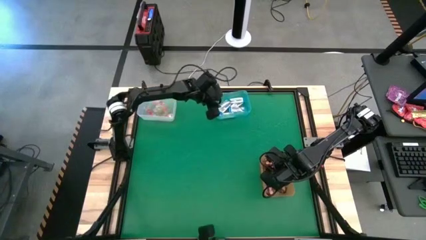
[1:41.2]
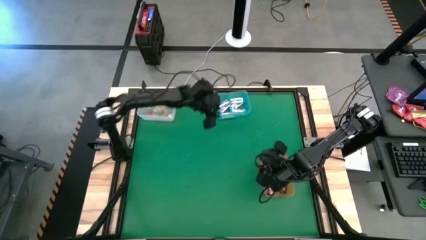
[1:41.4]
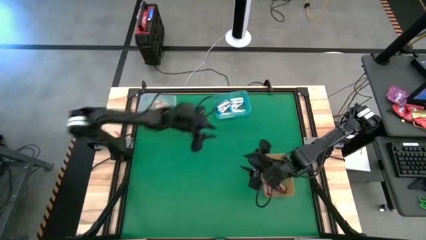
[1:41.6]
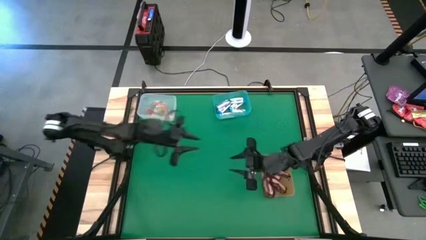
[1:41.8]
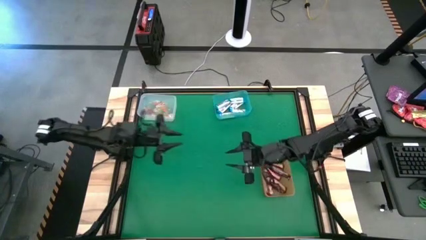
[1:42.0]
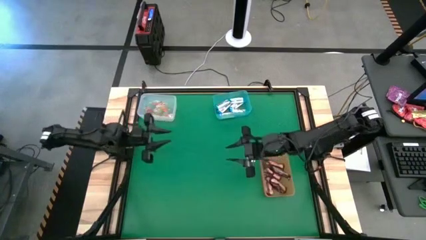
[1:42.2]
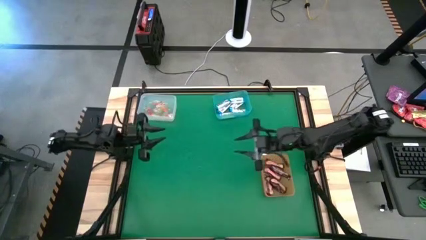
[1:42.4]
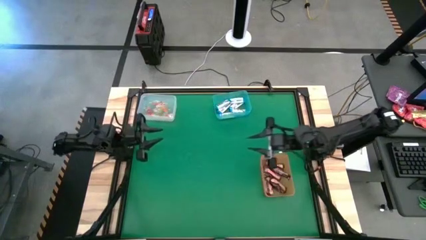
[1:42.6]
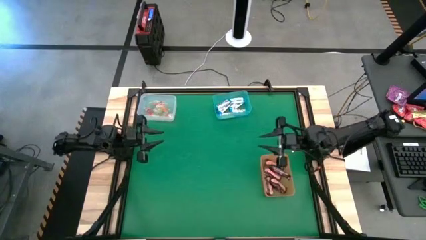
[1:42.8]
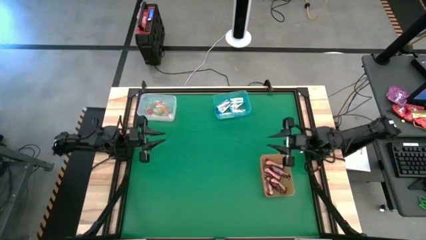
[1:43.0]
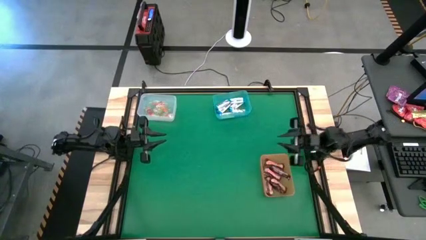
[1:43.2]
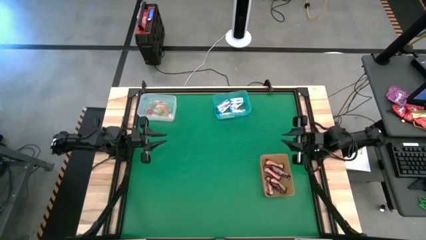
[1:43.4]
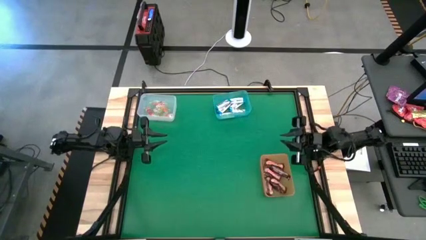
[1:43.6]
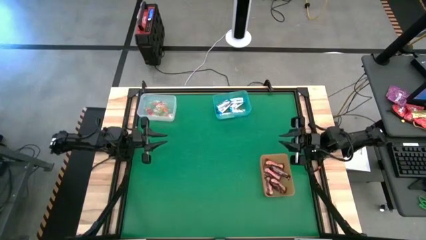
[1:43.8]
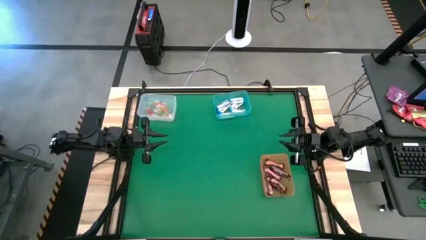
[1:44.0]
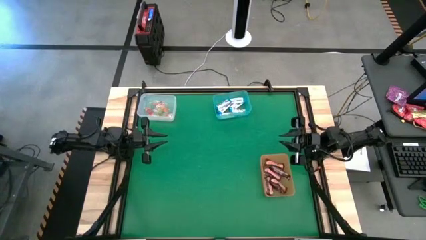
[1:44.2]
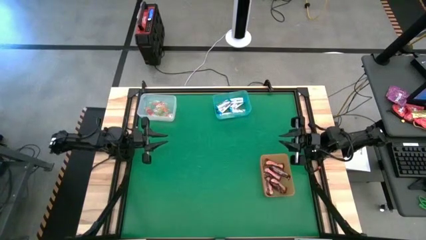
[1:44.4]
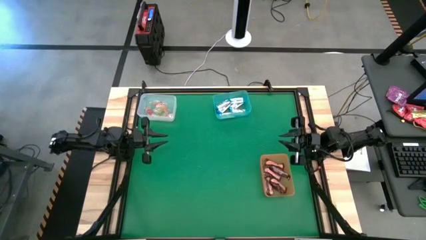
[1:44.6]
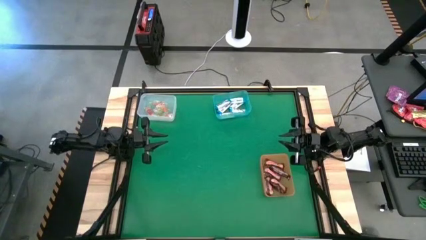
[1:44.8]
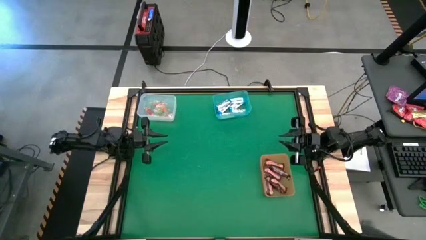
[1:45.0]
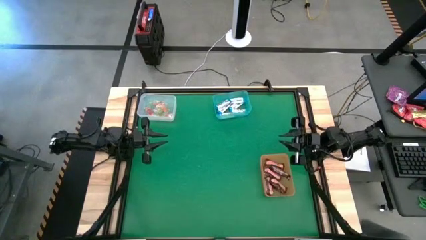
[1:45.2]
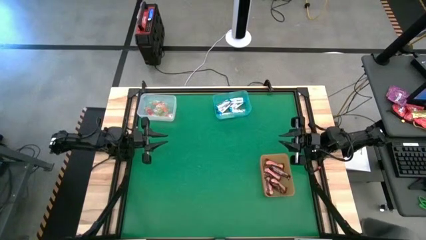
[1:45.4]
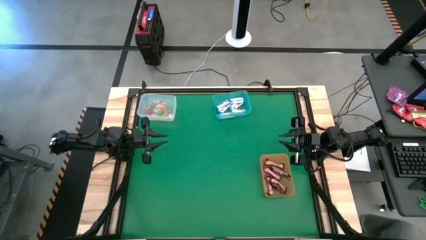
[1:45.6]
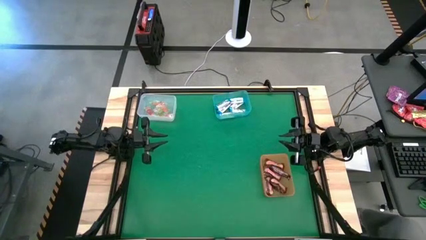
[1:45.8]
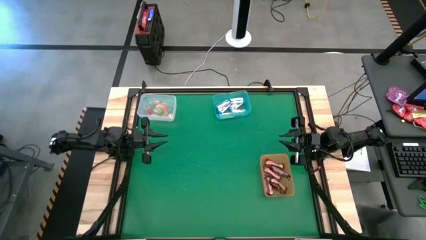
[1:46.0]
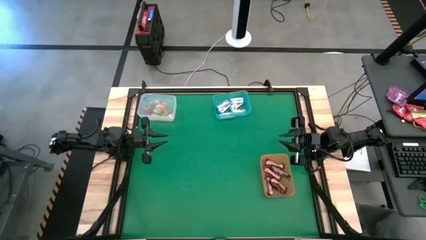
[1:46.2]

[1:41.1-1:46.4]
Task: Sort candy by brand, put in halloween buckets
Return to Home Position

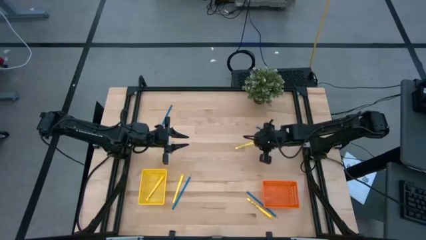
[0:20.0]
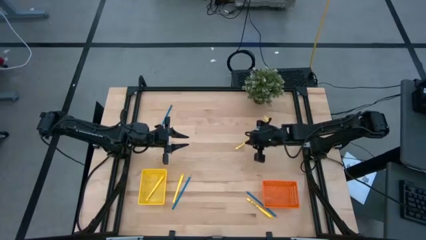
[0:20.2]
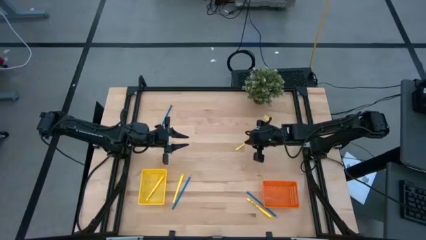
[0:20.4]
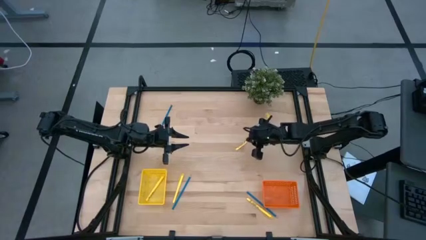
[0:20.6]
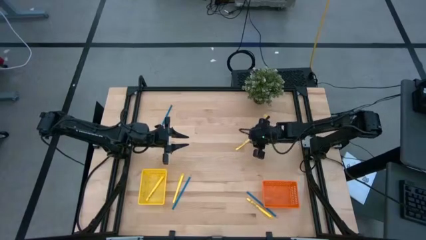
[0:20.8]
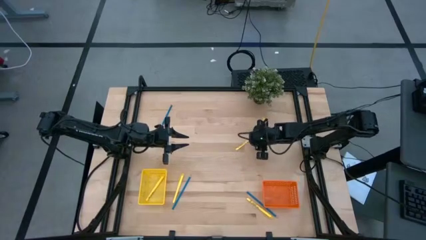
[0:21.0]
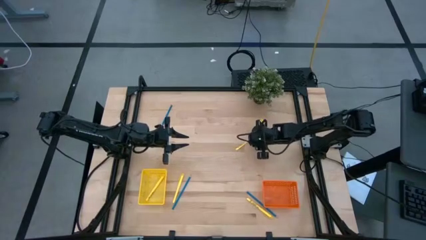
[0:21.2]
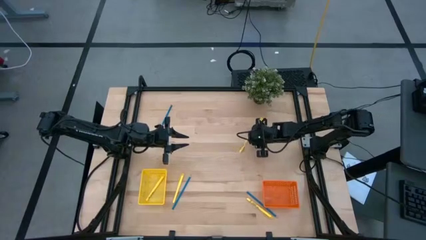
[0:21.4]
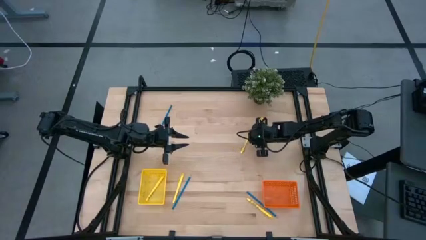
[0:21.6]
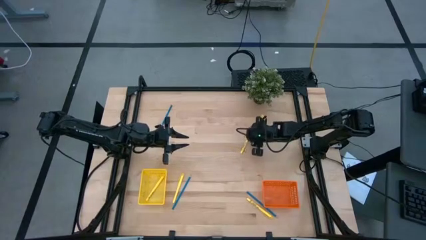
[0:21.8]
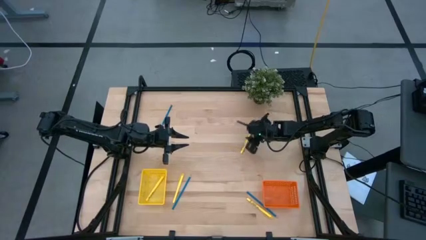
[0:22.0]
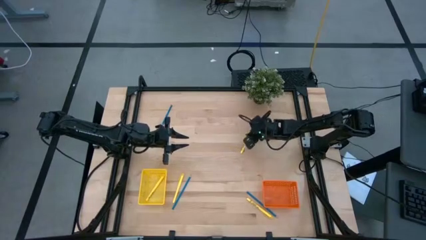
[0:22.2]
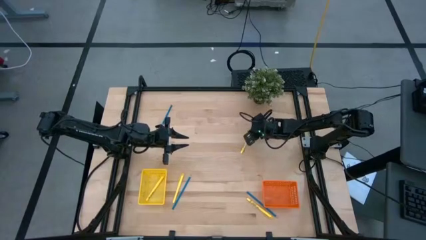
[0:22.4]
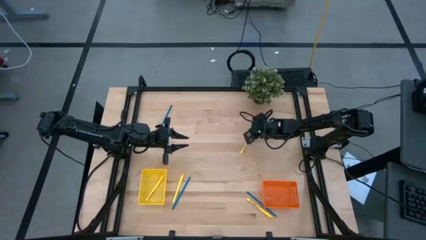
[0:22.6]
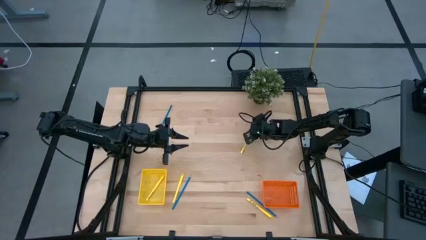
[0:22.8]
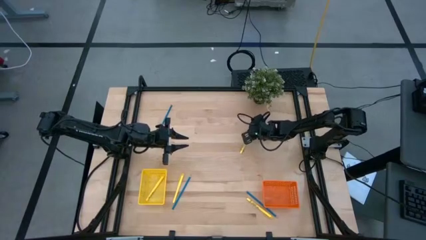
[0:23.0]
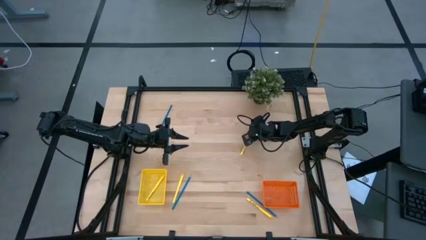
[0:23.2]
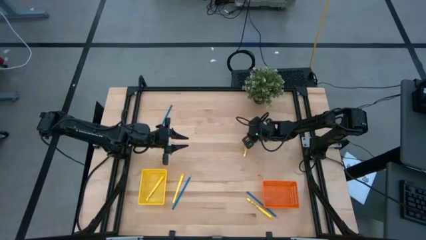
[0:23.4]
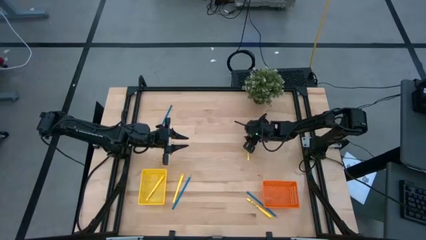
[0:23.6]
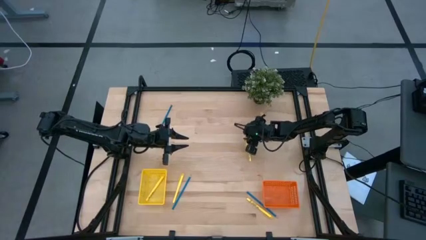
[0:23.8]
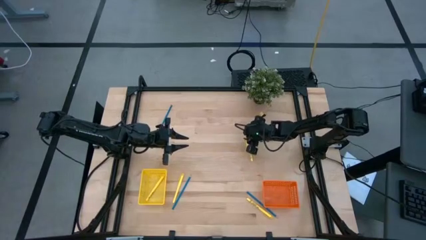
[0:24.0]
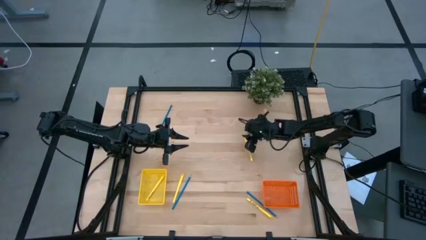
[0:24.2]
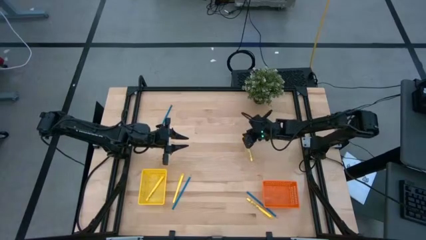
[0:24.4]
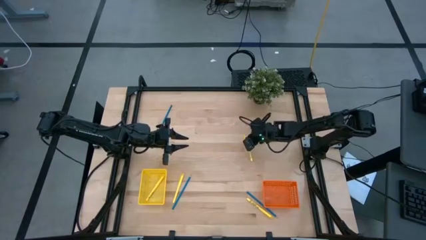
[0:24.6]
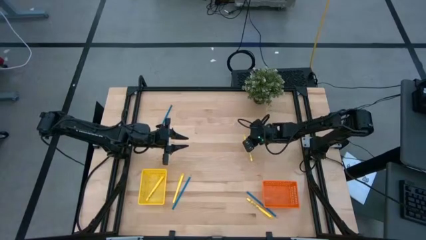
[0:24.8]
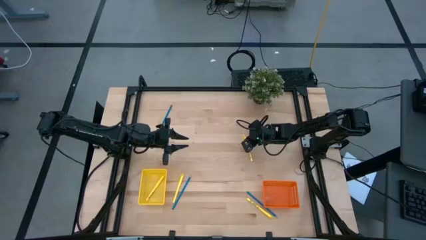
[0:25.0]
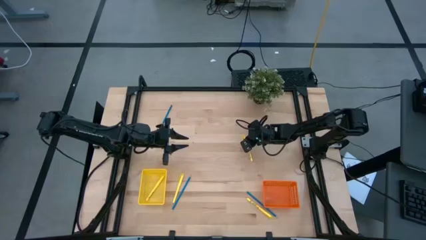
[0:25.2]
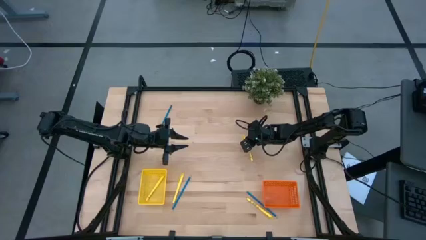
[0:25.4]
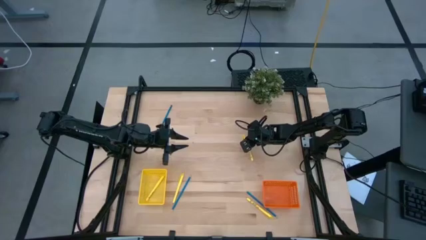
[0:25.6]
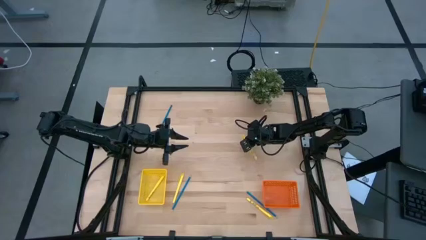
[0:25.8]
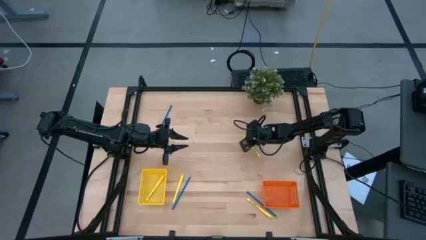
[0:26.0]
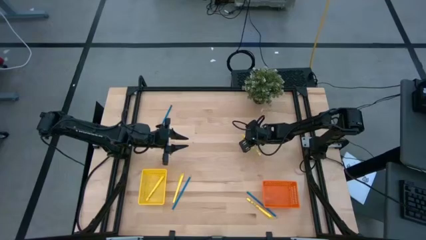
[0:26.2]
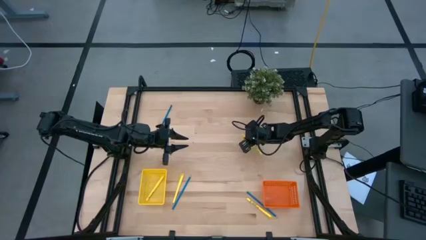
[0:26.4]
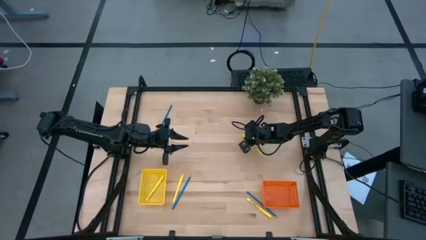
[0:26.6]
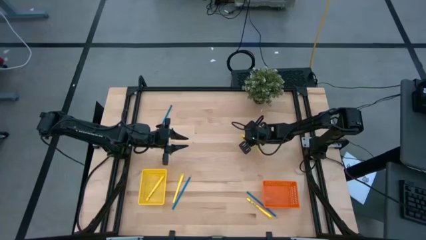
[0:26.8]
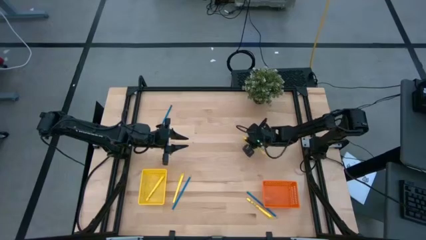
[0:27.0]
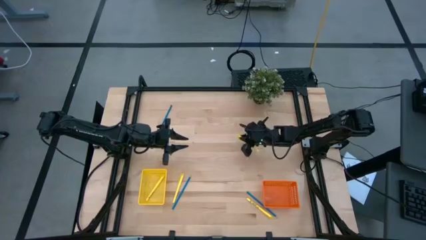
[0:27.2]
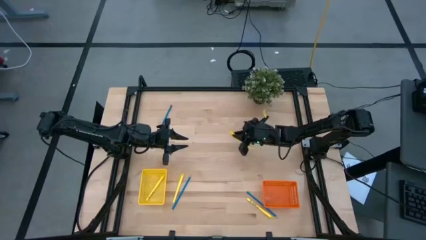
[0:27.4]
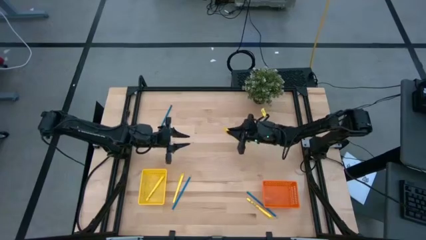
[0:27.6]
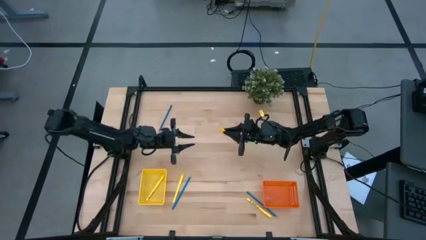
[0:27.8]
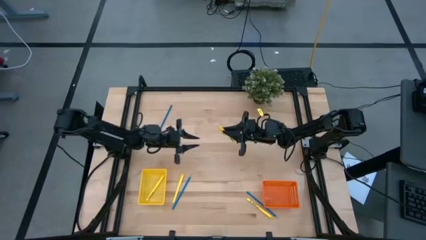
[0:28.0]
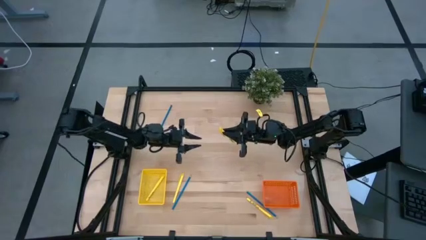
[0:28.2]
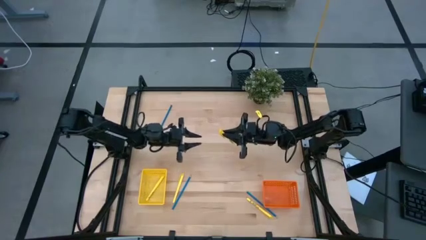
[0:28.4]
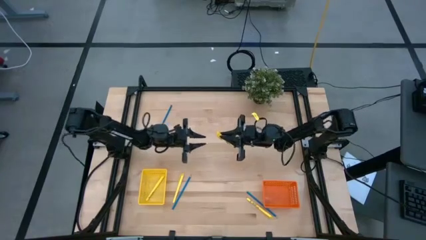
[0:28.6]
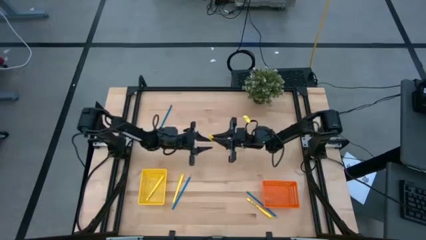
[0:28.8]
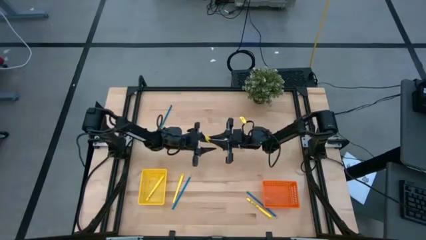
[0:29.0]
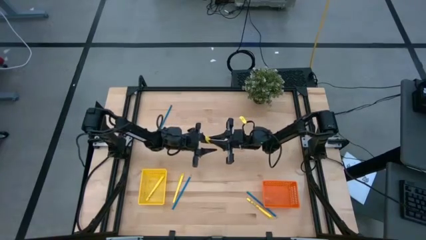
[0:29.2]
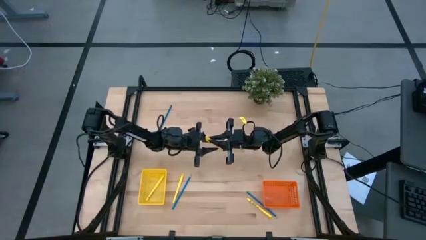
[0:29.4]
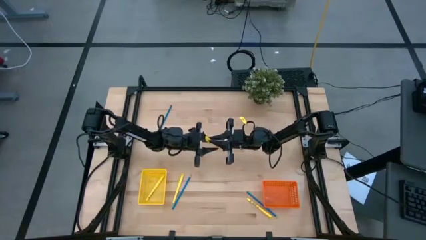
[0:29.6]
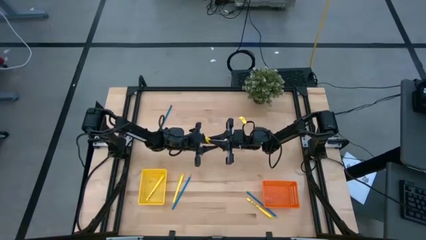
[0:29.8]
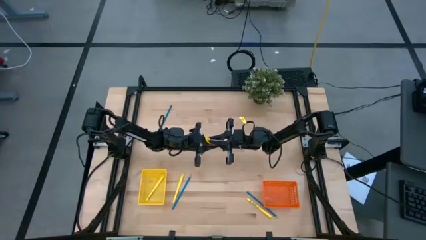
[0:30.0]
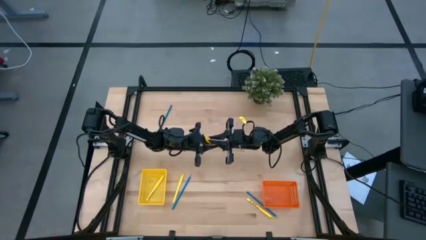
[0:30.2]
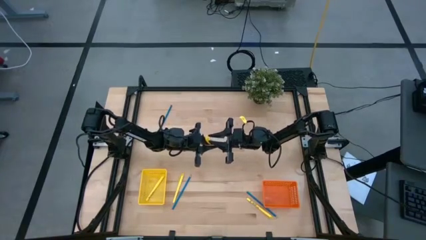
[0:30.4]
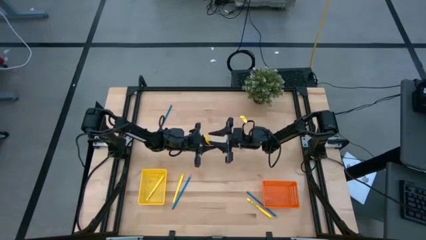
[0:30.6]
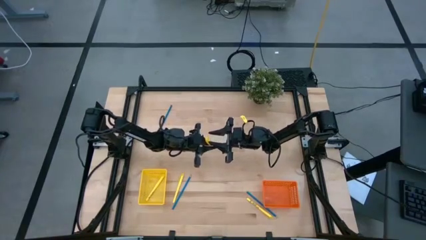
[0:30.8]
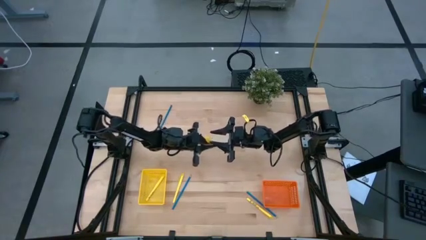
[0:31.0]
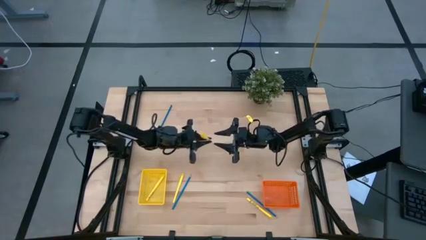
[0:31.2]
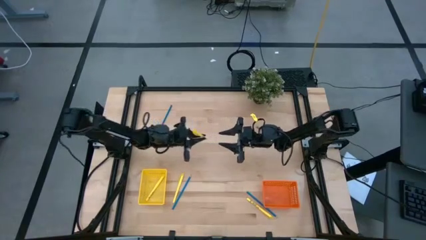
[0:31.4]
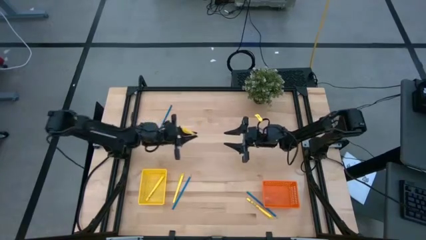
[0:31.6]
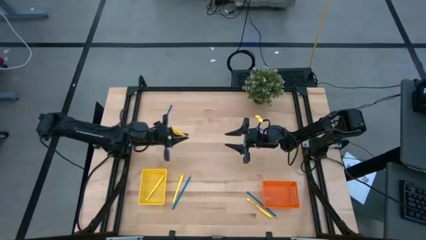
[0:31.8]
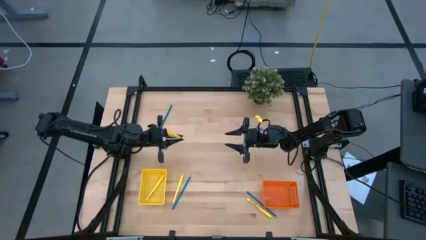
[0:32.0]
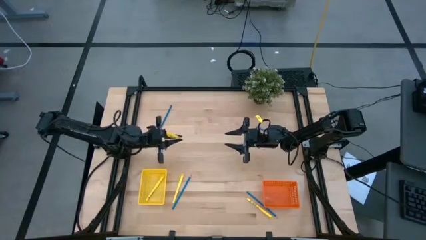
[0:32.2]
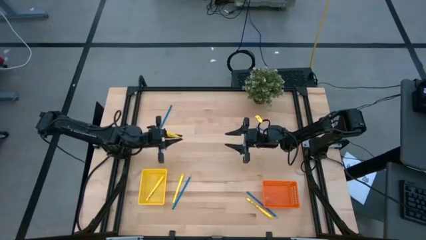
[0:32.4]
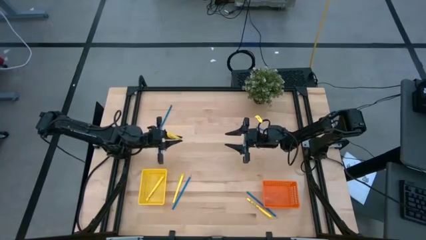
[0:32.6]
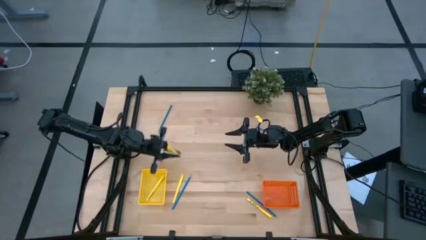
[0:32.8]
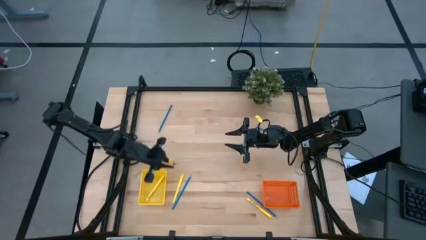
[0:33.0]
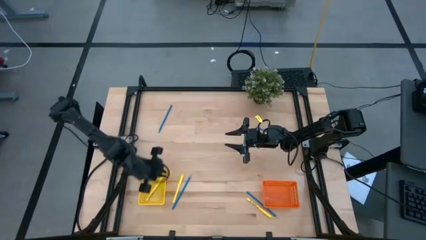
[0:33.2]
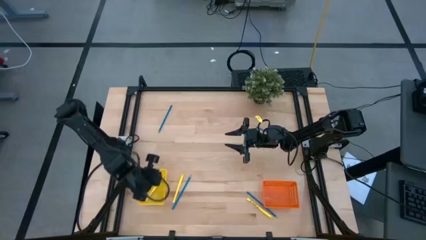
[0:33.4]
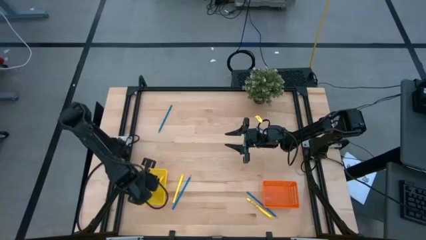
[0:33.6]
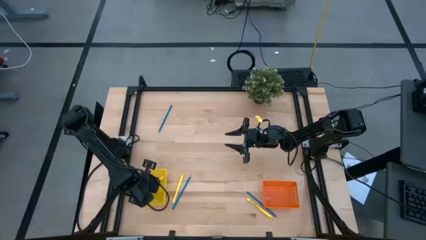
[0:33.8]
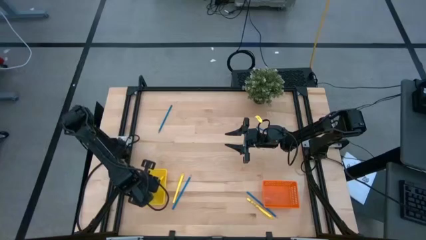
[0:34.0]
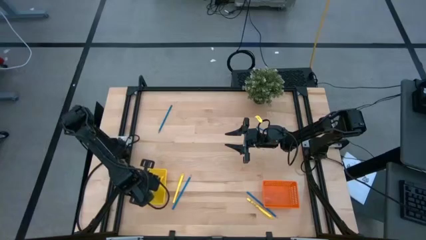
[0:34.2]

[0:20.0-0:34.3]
Task: Sort pens & pencils
Put the top yellow pen into the yellow bin
